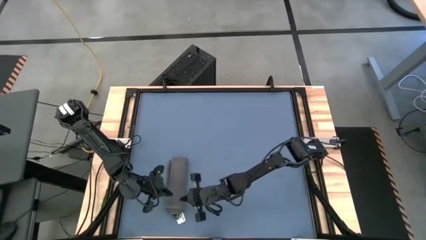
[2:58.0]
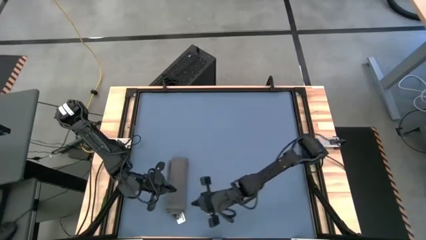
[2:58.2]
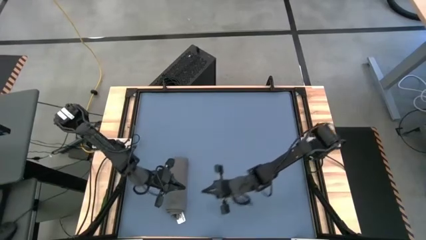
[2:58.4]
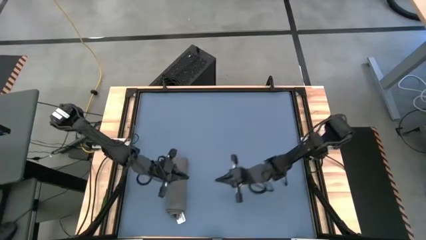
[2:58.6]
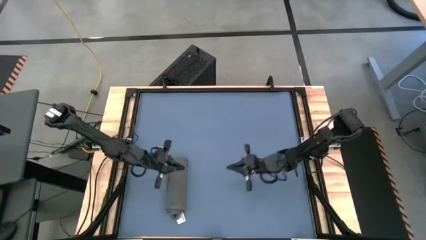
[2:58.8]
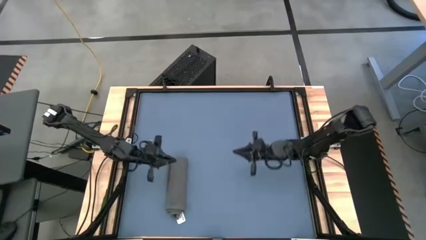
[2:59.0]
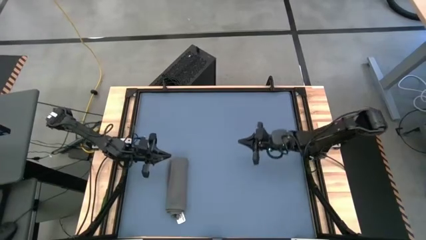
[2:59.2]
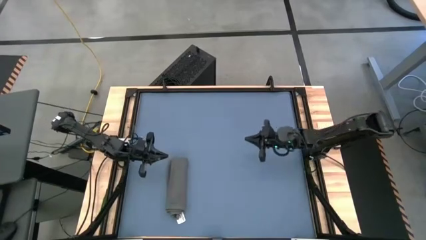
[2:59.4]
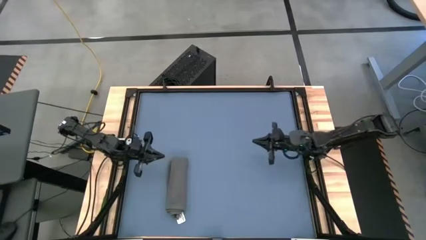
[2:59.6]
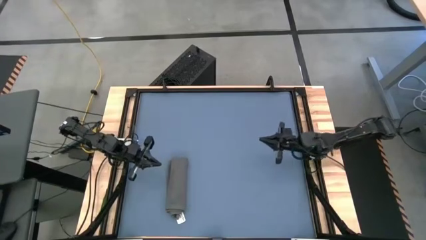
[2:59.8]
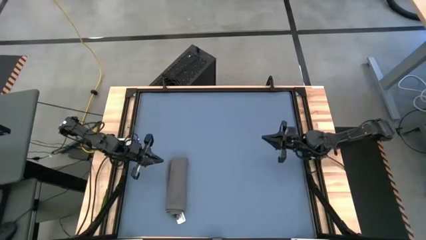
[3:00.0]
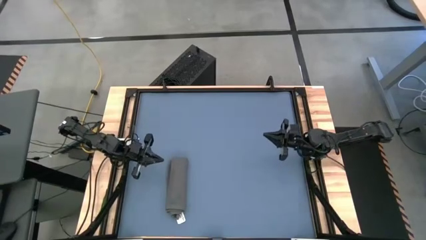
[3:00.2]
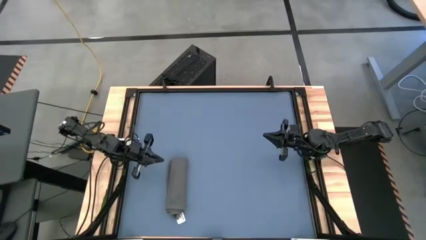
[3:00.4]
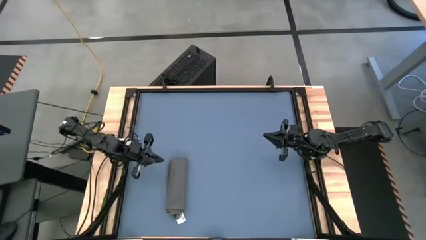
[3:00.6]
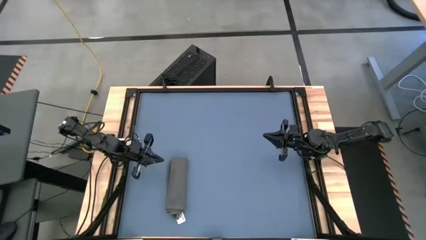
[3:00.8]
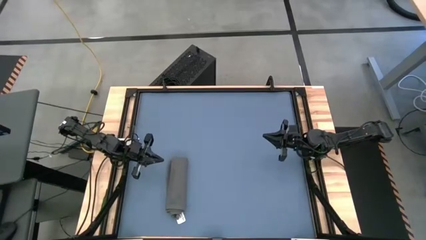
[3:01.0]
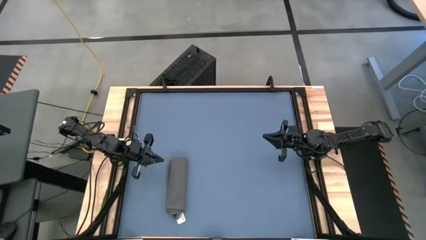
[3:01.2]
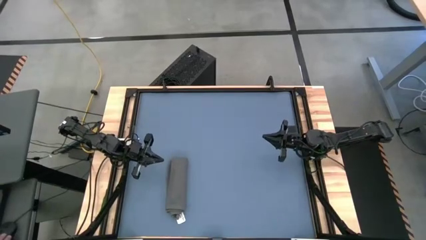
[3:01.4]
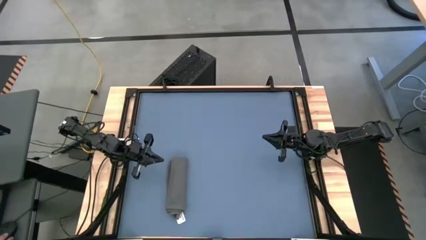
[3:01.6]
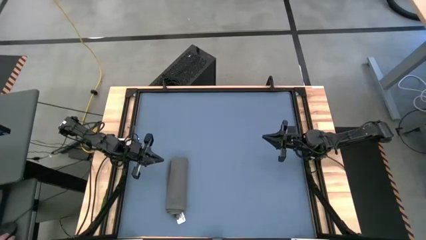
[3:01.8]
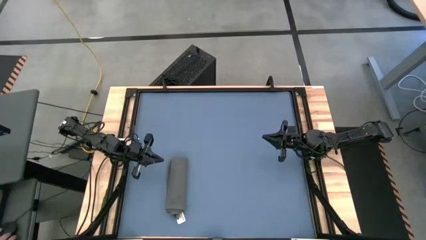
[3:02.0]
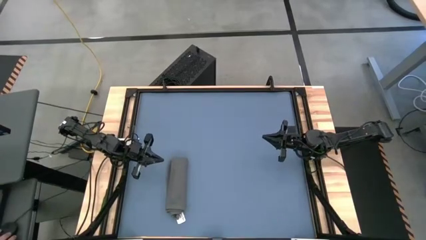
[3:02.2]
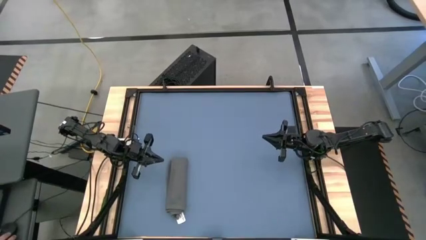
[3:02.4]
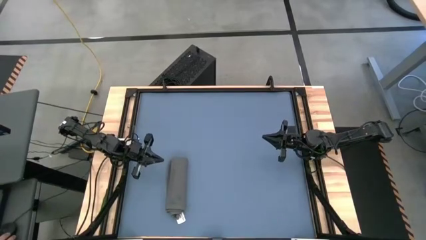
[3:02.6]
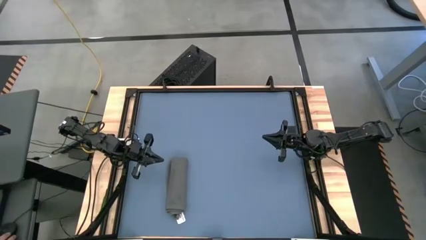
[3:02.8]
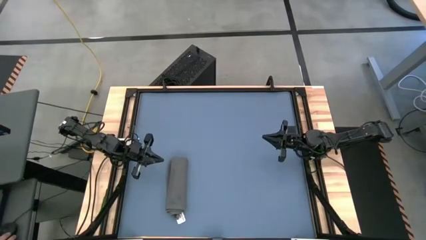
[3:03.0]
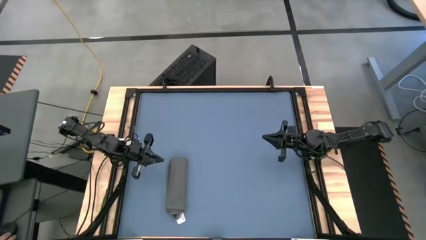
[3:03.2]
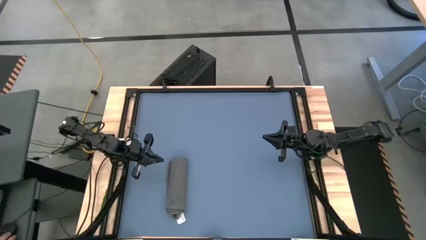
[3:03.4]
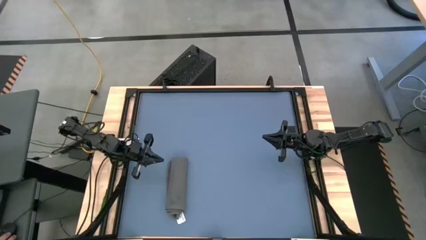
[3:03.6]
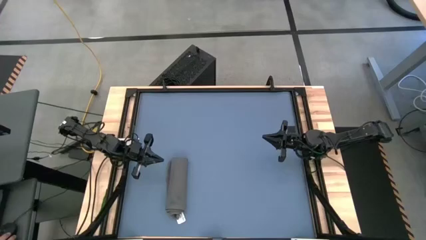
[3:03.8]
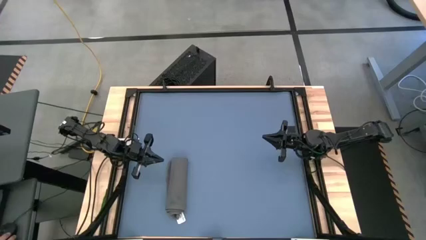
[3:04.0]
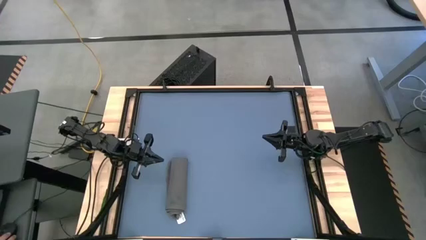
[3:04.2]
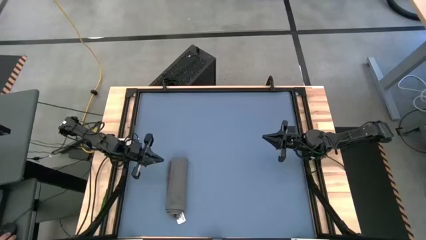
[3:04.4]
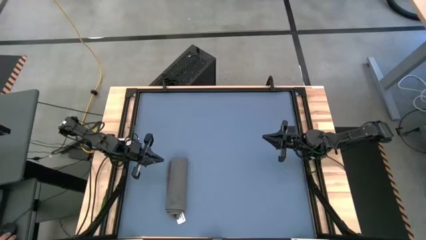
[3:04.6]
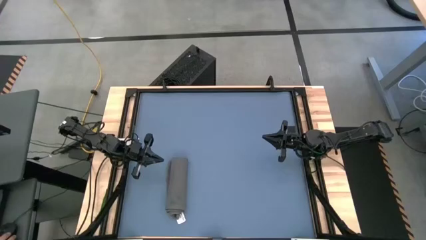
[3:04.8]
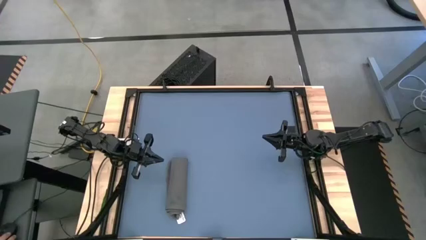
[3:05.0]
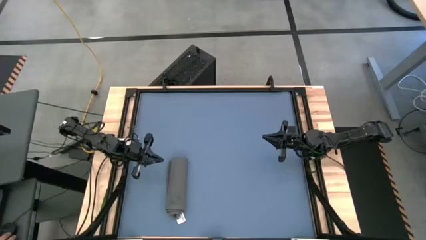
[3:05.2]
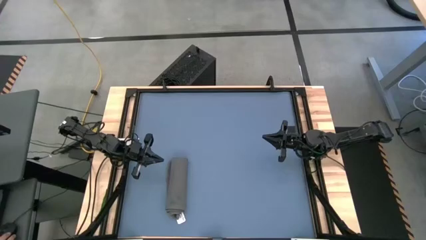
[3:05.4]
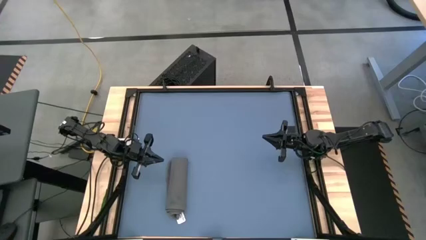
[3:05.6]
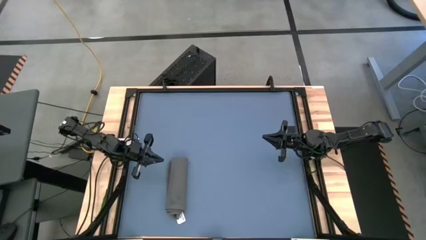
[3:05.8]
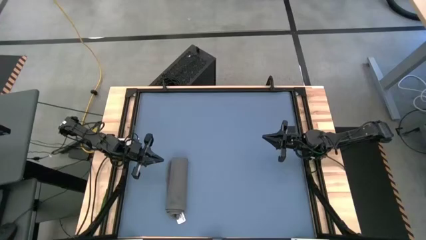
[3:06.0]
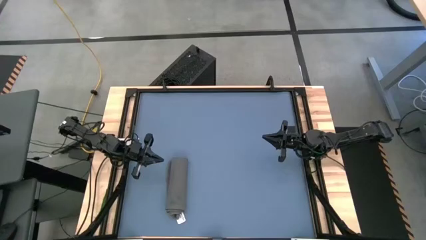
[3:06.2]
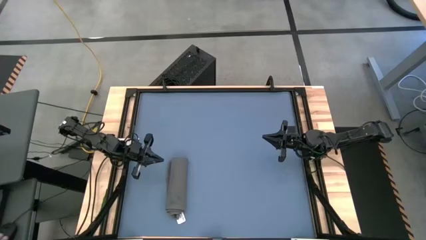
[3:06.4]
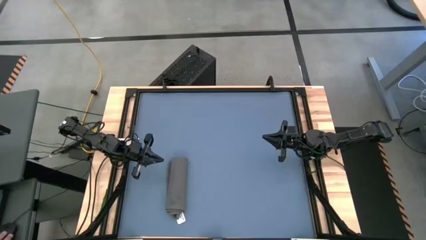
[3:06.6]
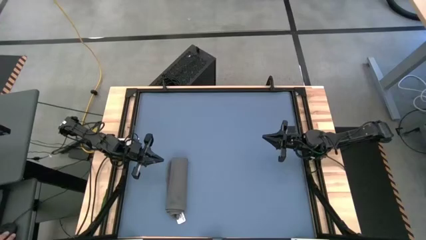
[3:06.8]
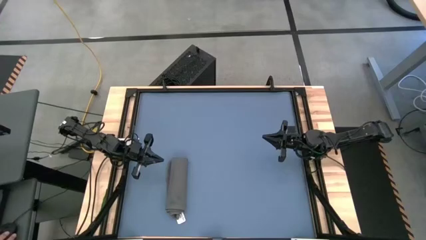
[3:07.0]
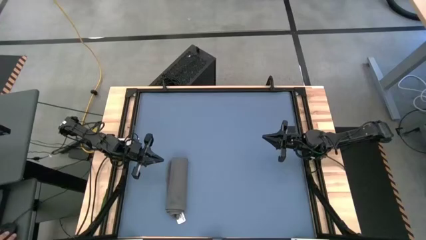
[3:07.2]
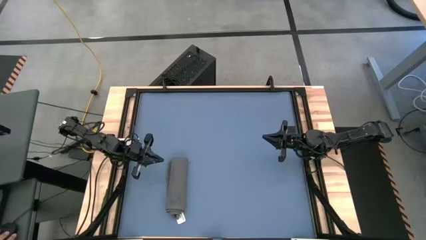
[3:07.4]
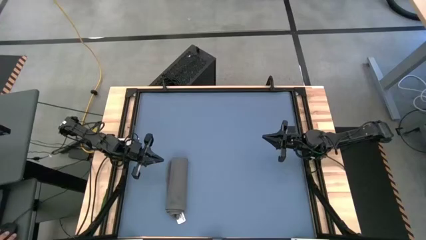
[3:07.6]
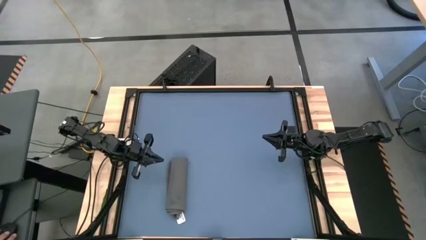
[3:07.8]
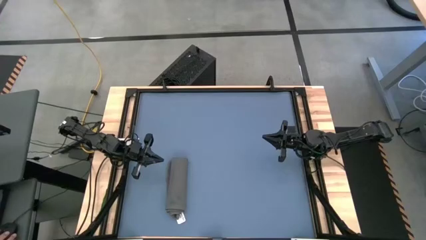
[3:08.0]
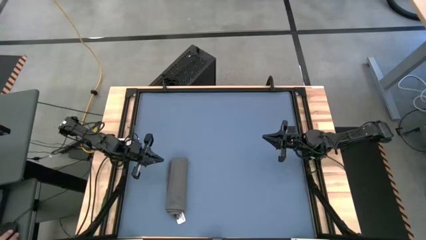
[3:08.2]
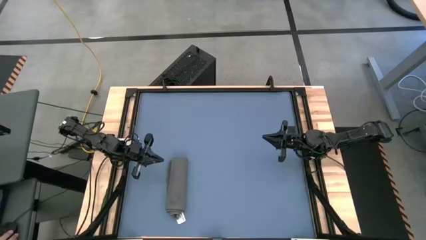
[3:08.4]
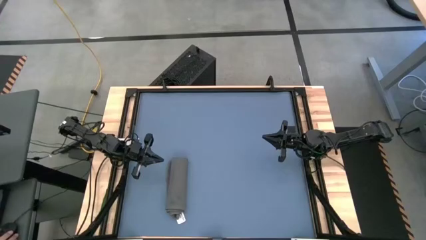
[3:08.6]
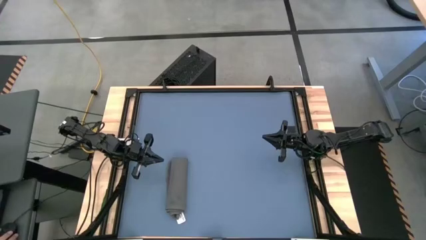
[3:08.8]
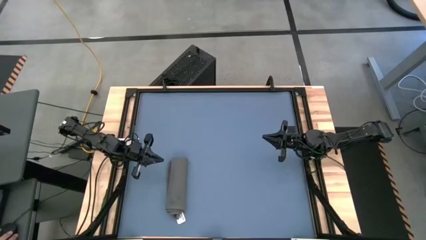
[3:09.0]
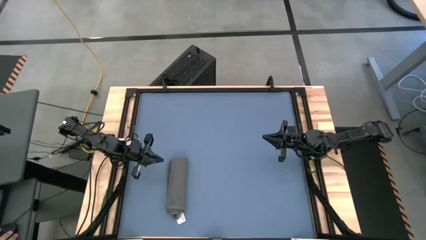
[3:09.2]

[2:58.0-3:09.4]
Task: Roll towel into tight, uniform cylinder
Return to Home Position

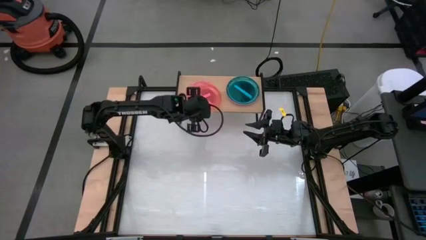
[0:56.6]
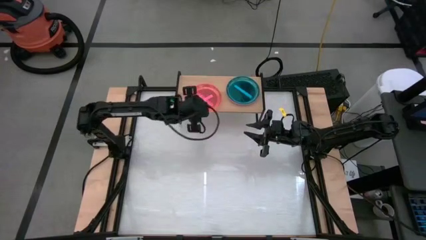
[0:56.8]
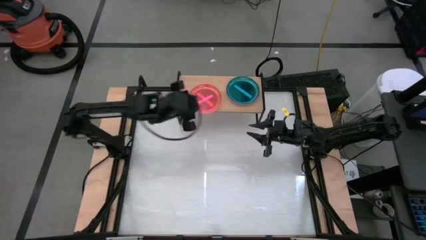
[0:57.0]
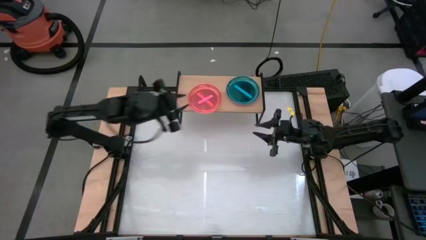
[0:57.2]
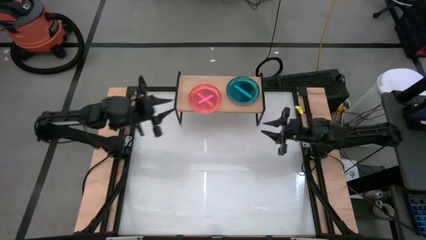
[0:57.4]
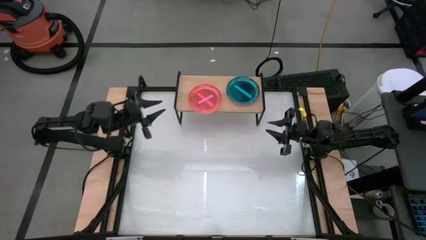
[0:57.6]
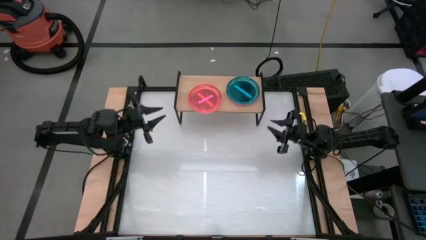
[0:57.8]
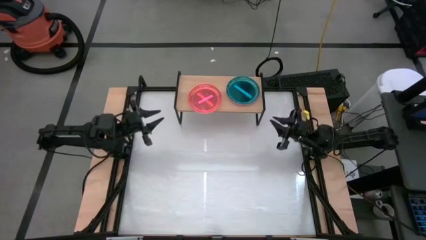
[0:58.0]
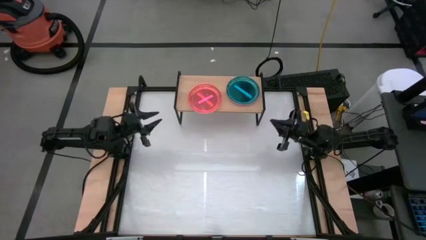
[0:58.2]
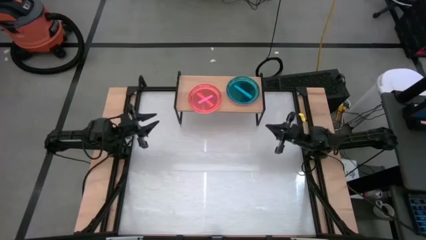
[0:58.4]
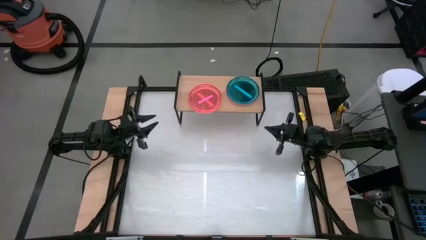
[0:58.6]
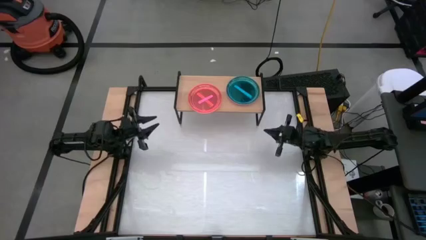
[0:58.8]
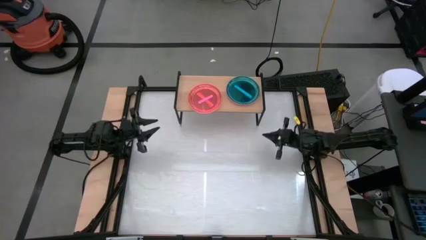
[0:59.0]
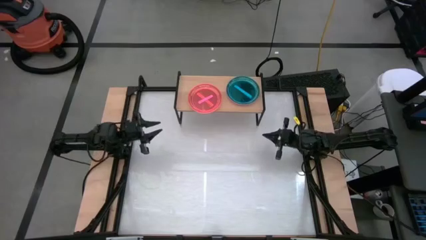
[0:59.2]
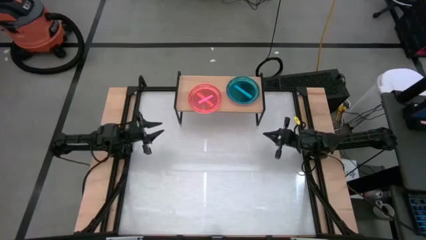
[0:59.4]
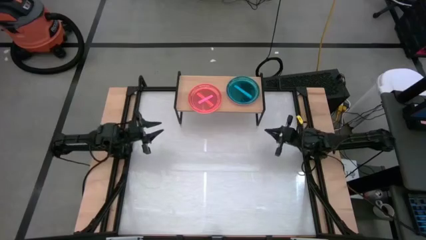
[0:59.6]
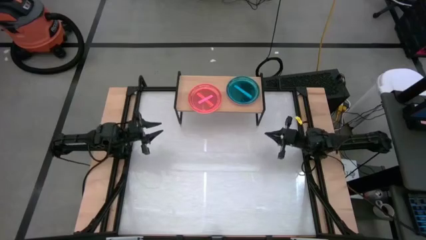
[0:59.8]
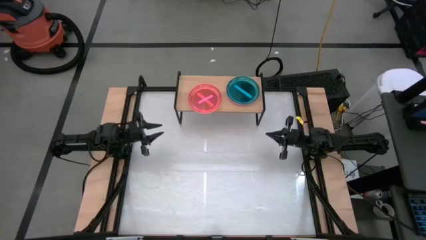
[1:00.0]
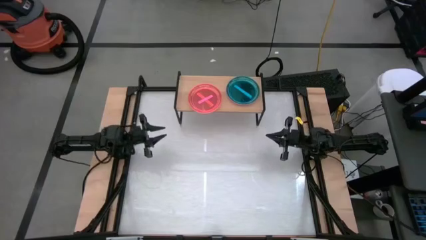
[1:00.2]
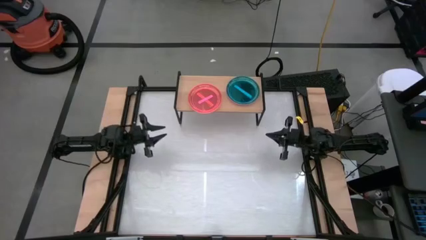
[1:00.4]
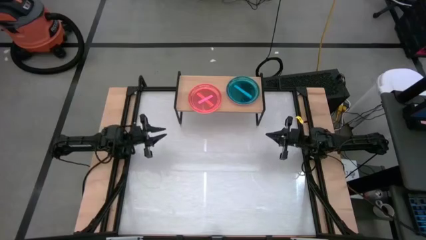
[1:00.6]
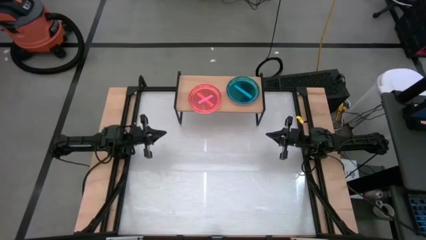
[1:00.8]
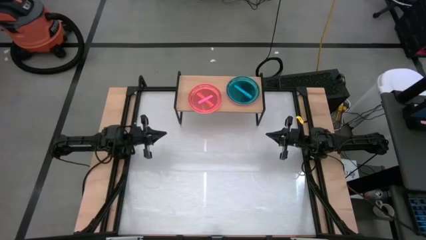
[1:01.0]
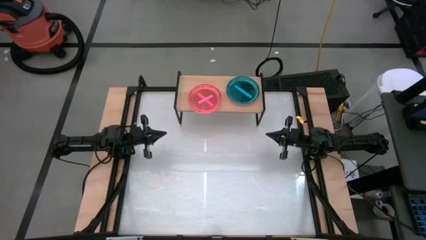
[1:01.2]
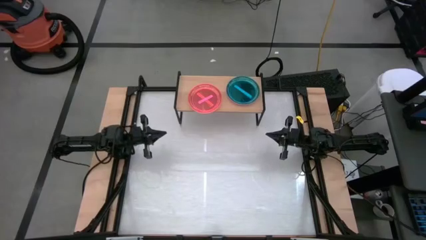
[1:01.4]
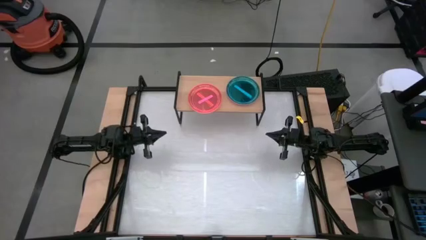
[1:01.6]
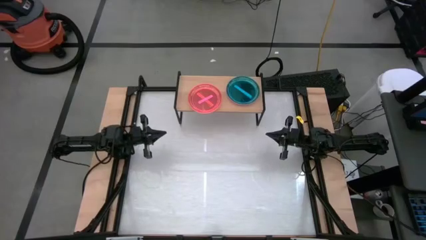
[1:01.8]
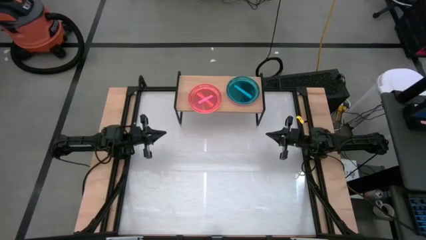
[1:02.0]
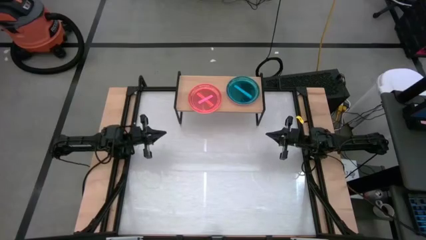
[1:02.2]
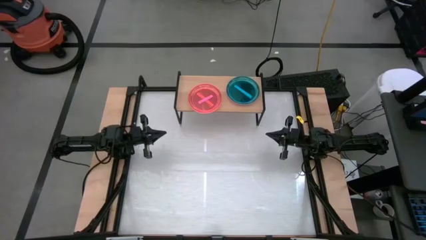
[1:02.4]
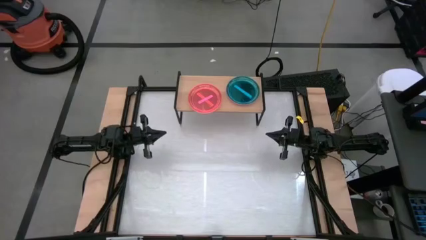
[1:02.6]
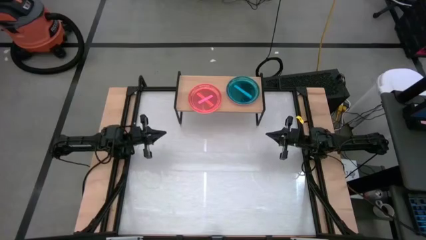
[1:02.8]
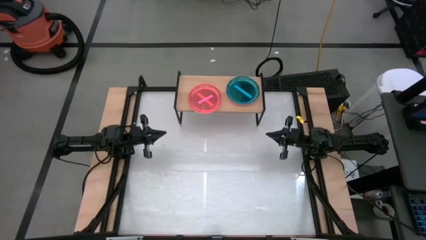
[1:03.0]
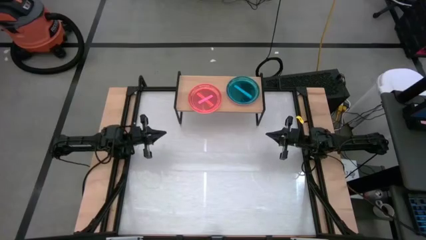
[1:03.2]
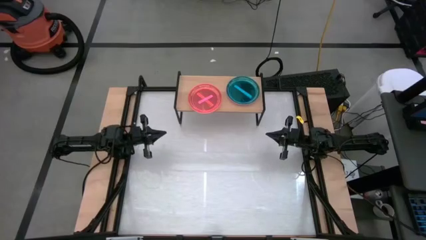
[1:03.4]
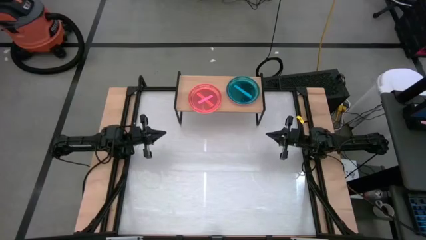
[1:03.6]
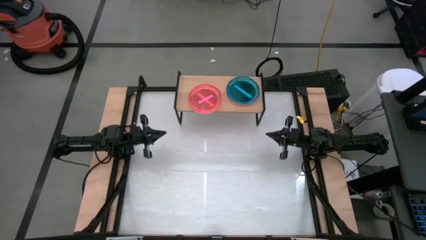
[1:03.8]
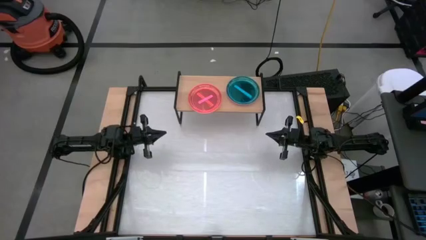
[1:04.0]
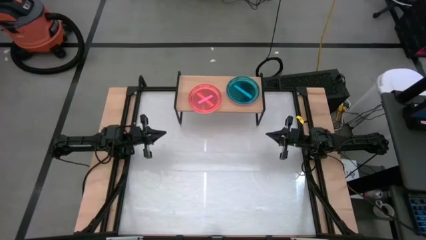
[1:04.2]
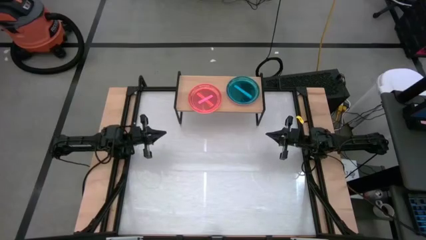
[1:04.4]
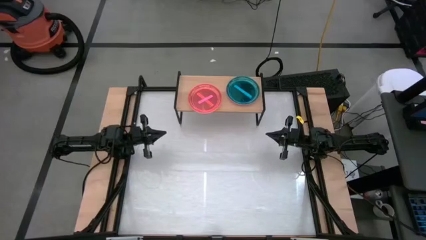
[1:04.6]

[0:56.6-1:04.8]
Task: Place and stack plates onto a shelf
Return to Home Position
